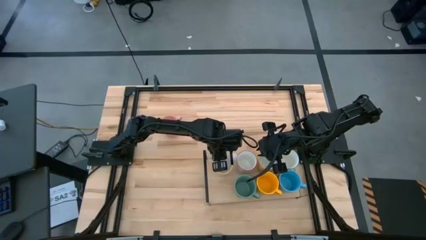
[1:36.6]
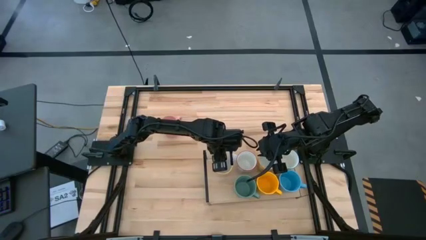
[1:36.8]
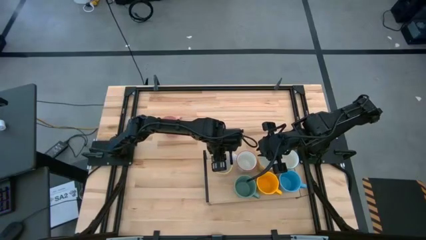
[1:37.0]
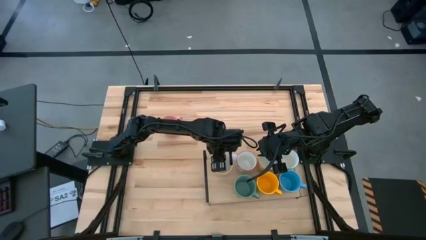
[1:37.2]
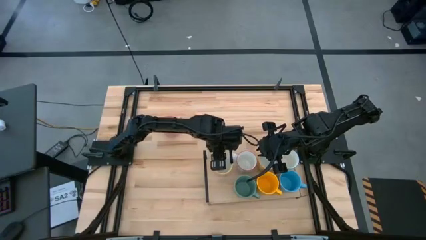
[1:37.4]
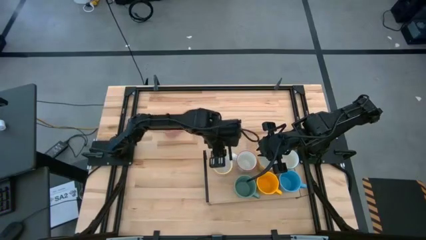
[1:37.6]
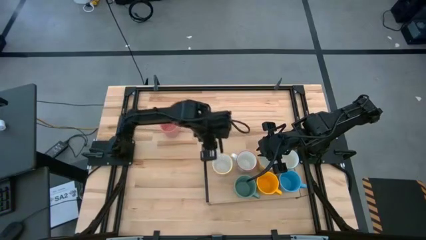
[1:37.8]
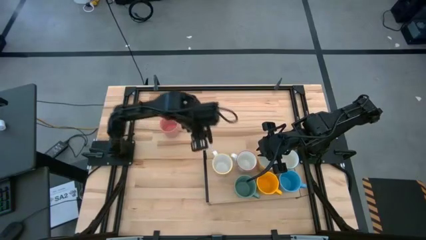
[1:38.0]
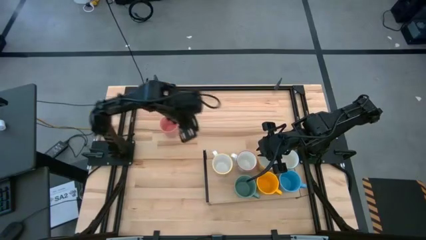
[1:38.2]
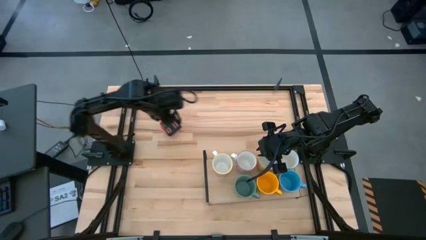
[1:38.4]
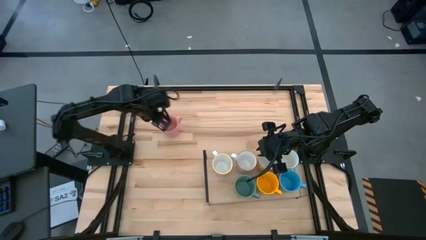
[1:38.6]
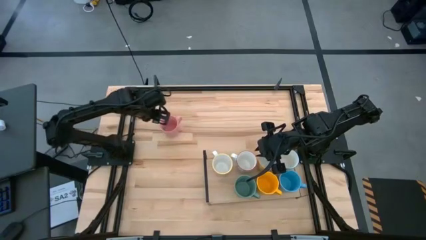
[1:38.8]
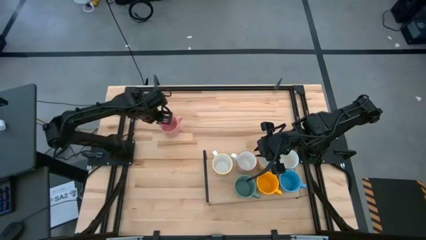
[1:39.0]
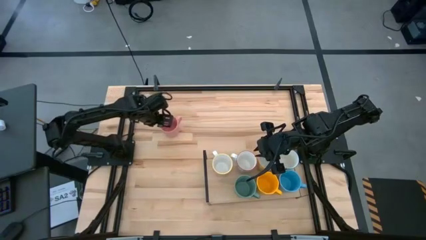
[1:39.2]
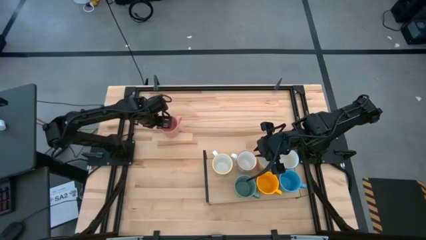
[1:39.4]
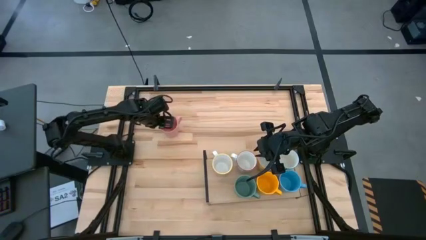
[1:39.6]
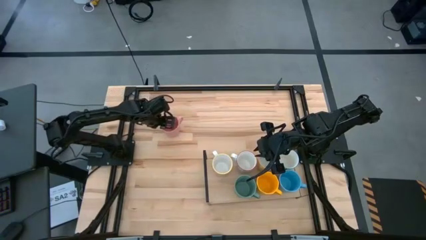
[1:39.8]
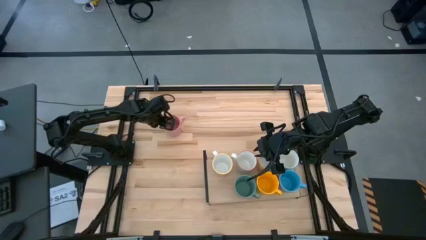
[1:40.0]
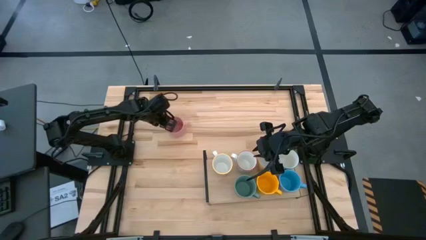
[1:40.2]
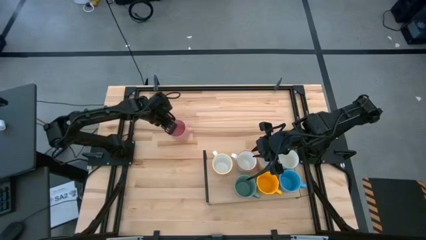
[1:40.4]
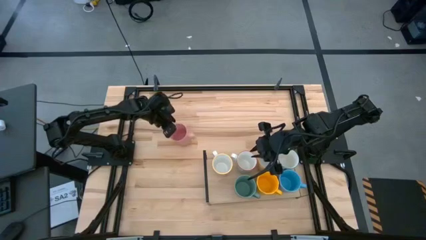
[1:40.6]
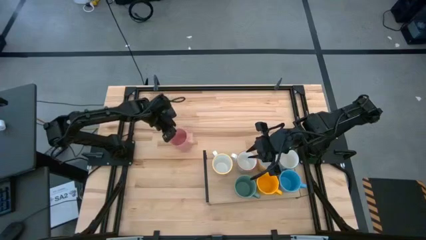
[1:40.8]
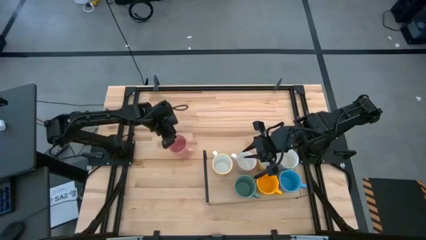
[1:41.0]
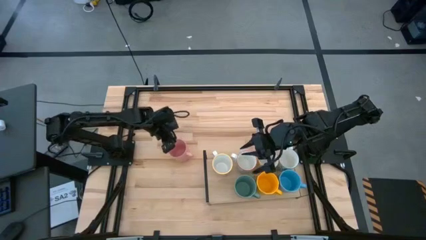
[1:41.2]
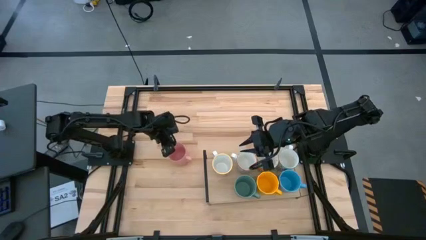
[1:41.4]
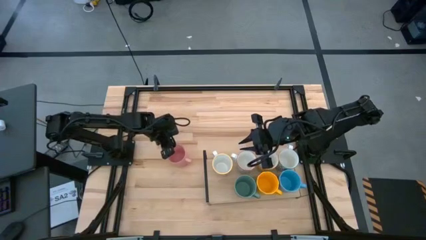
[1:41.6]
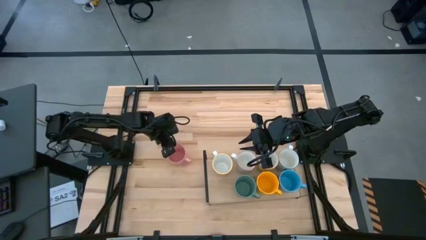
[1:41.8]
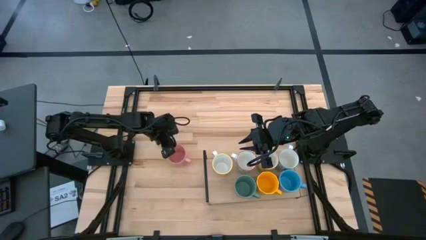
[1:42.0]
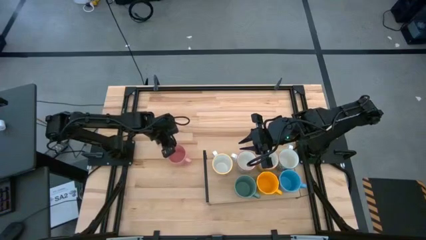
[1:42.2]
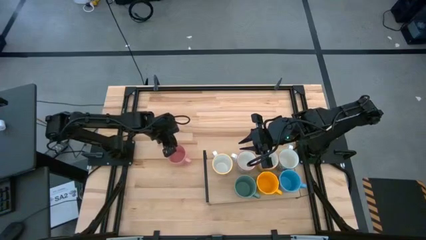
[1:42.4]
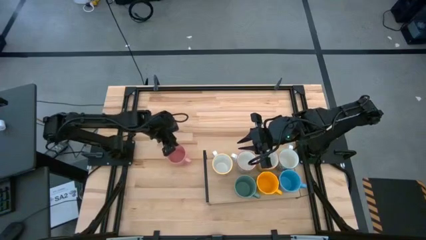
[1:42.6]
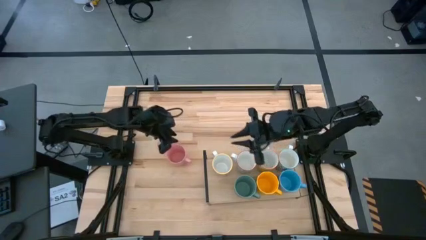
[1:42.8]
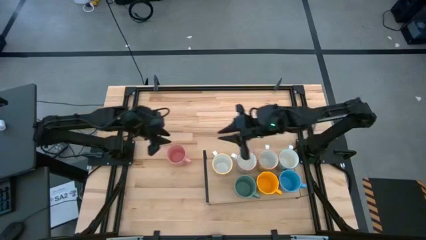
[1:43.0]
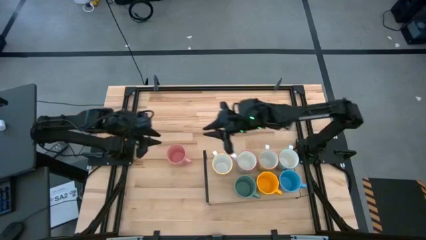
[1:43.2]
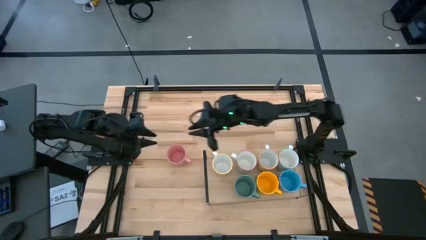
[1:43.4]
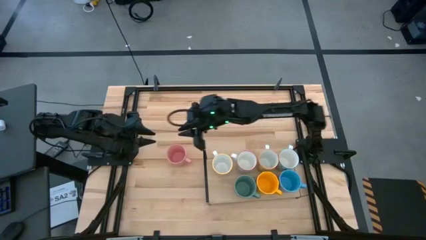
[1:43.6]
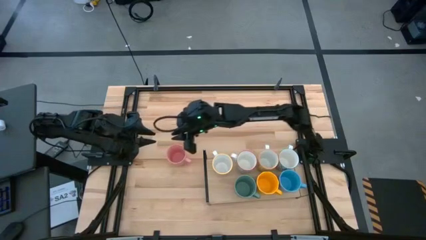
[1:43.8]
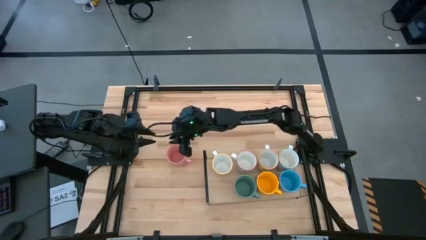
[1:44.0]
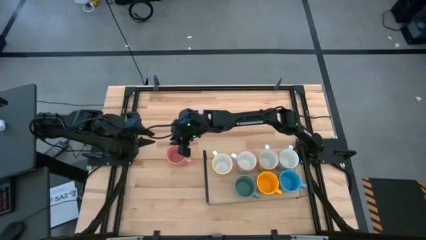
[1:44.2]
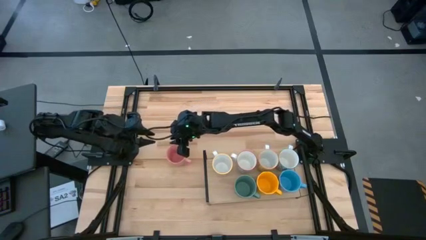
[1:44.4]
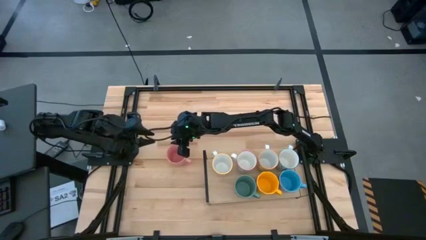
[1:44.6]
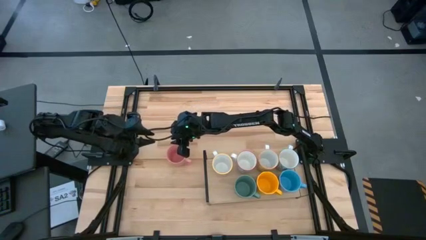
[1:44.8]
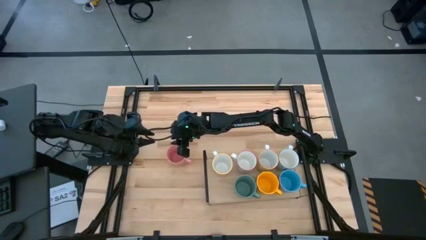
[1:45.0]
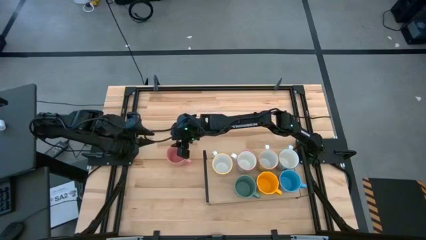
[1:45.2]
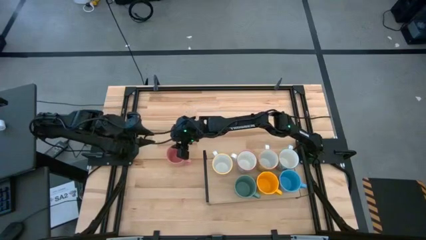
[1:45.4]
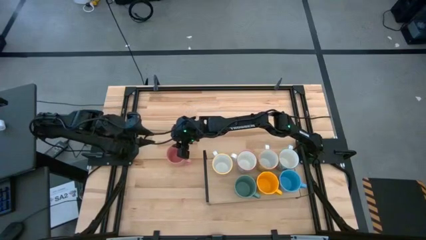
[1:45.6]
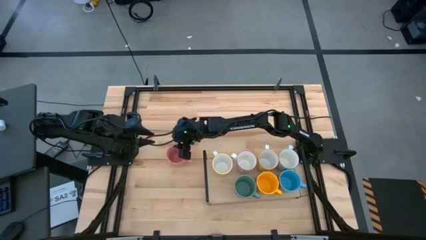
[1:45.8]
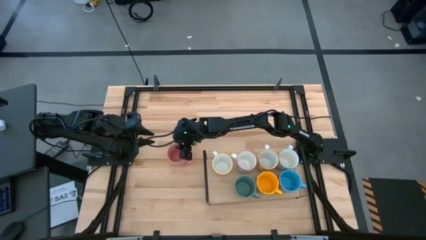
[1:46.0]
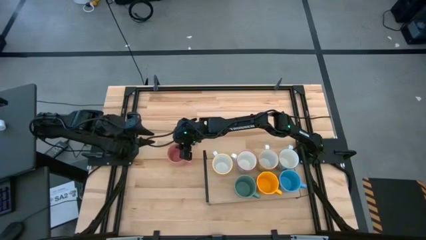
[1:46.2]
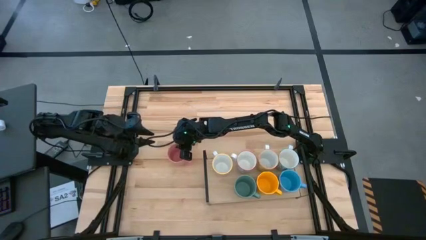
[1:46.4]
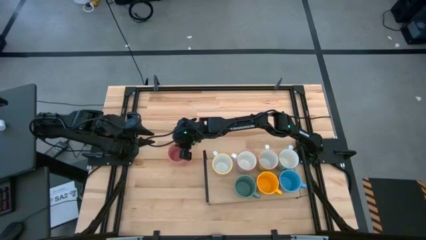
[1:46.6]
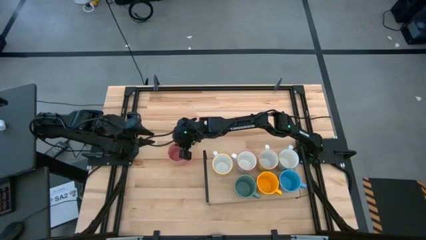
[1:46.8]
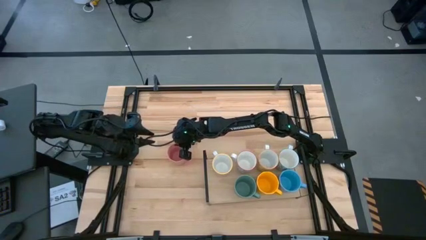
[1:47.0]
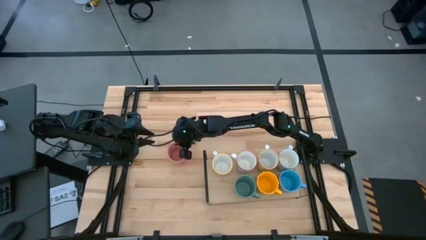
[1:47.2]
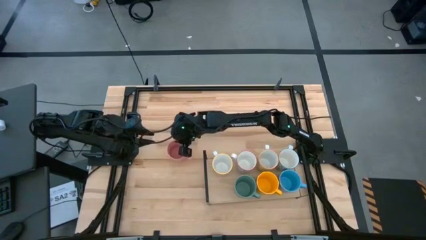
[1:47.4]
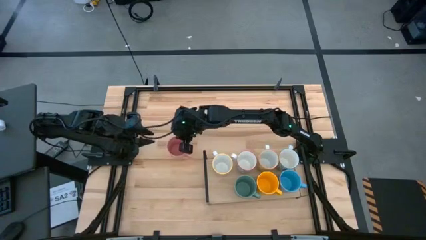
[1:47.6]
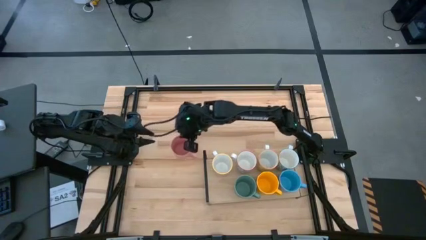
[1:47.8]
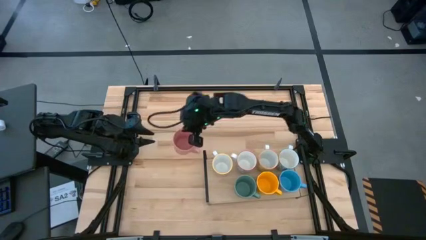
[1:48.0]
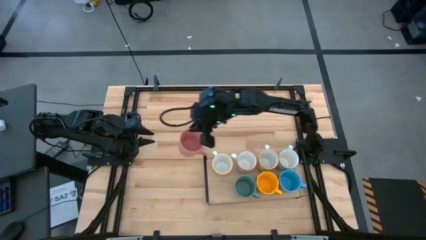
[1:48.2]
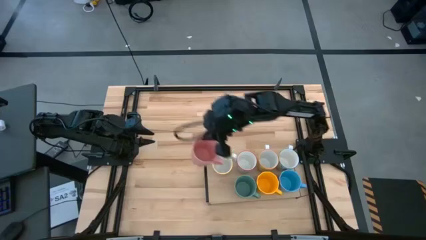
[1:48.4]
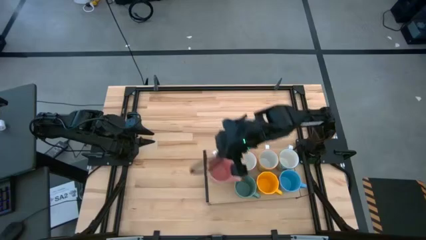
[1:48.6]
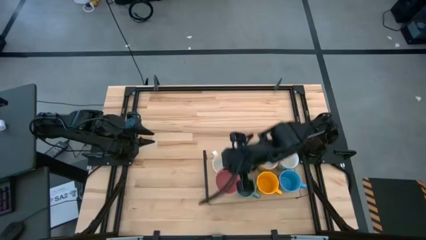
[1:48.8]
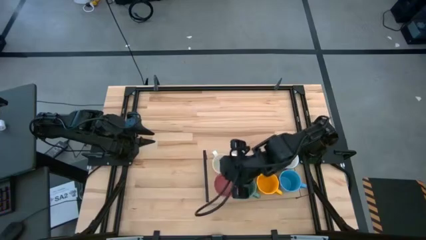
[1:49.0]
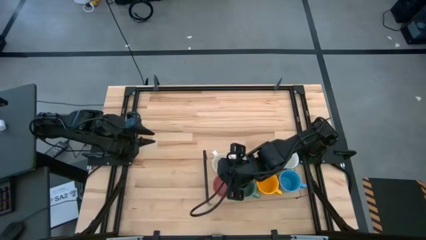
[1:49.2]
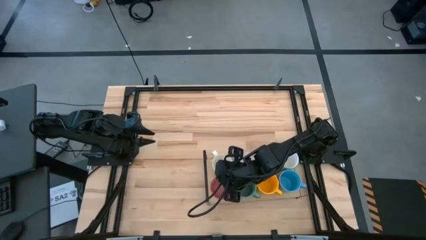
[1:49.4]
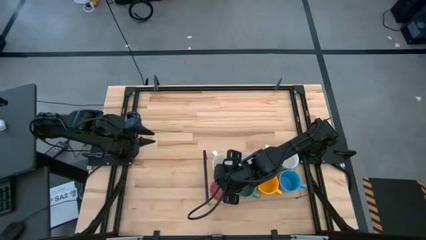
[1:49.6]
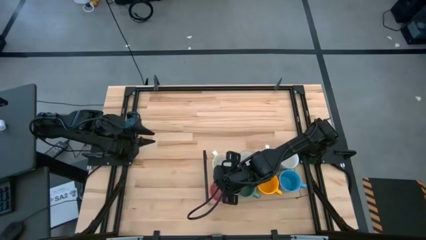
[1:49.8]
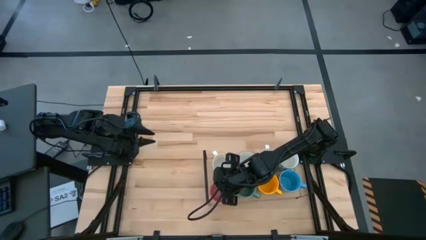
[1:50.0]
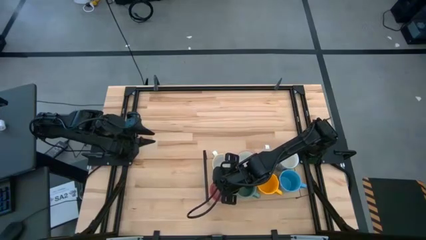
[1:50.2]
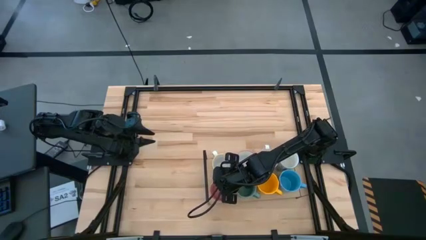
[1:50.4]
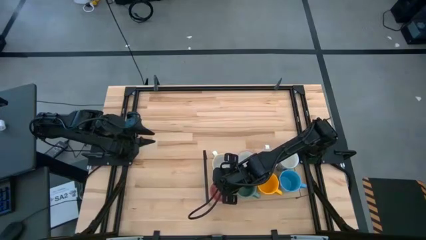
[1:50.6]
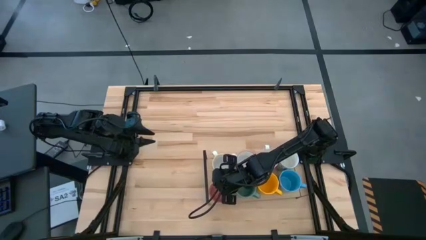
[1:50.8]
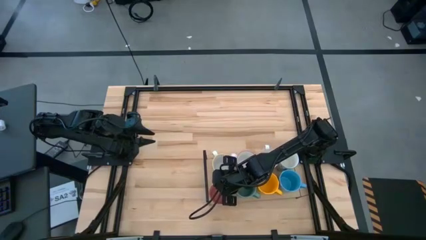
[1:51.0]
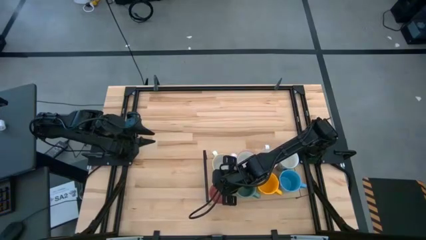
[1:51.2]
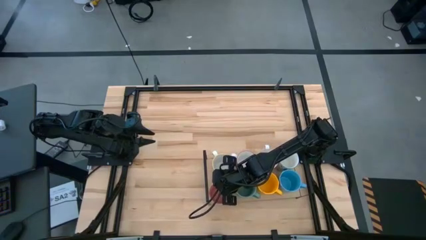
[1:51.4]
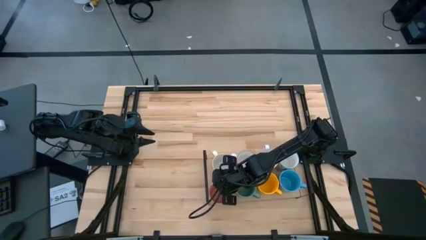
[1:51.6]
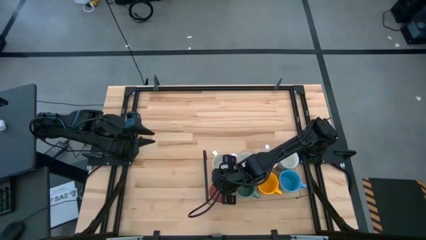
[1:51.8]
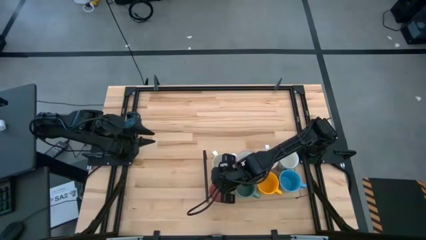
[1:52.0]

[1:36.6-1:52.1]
Task: Place coffee mugs
Put the pink mug on the shelf

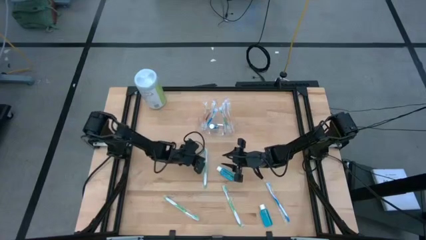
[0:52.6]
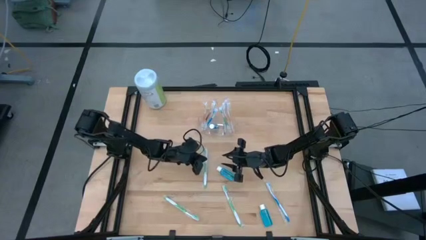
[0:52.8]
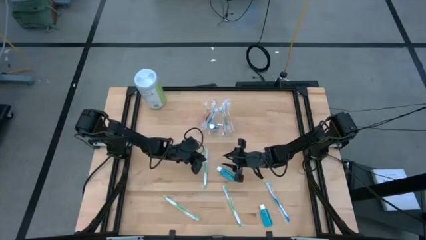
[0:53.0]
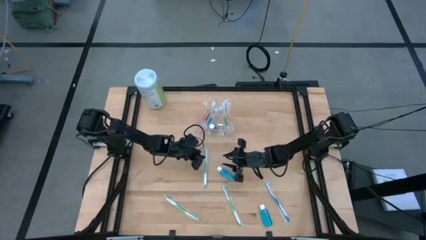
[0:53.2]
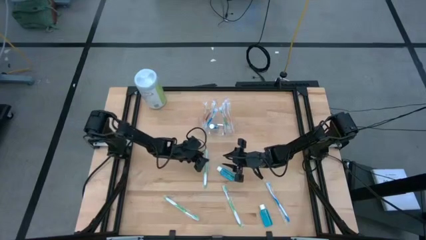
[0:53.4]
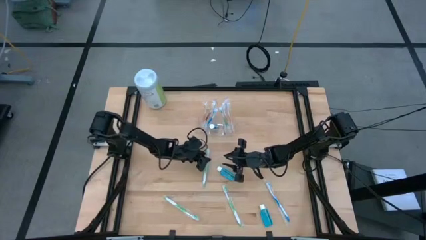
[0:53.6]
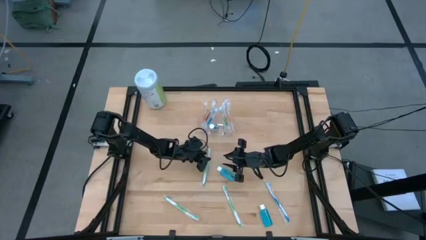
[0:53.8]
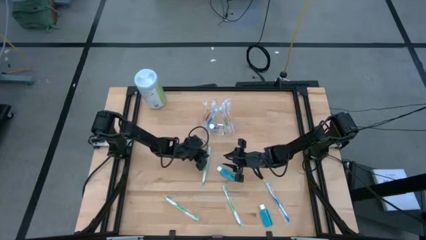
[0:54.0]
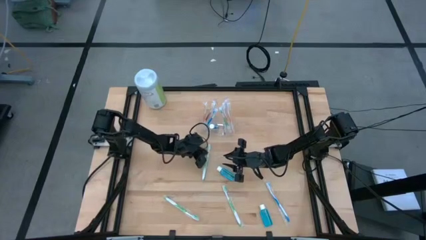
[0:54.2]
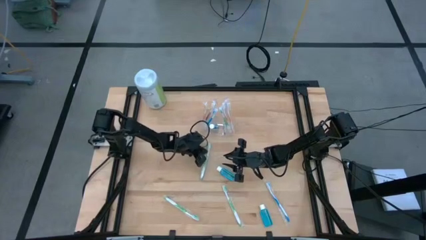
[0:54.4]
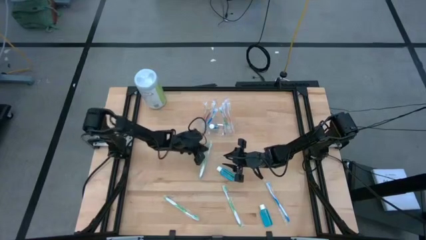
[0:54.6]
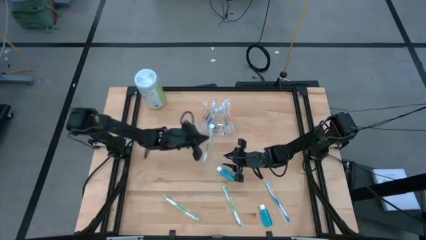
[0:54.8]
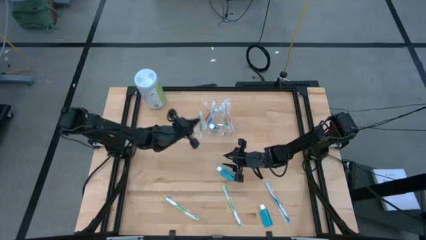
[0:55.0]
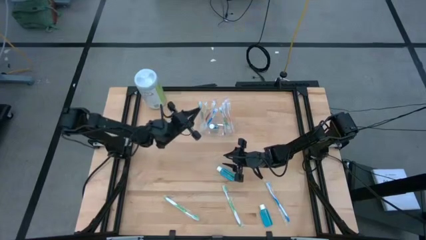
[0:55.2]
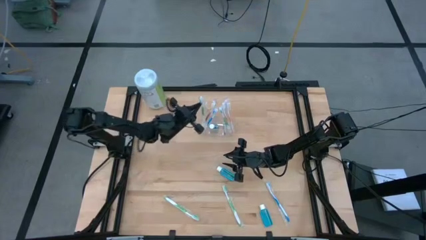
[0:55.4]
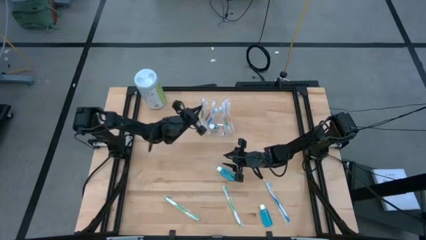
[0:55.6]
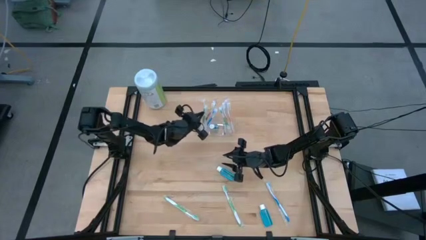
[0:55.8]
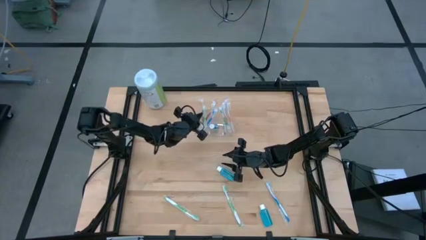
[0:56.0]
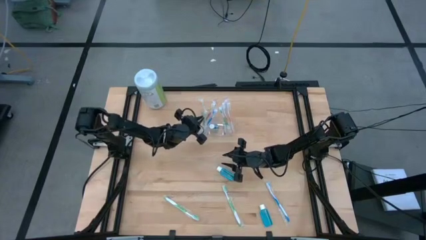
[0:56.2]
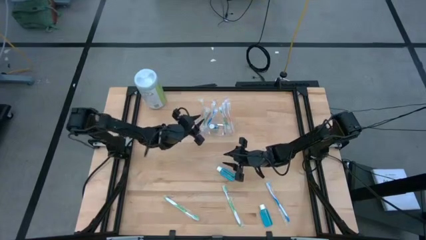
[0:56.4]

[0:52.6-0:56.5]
Task: Pick & Place toothbrushing station
Put the green toothbrush to the left of the transparent organizer
